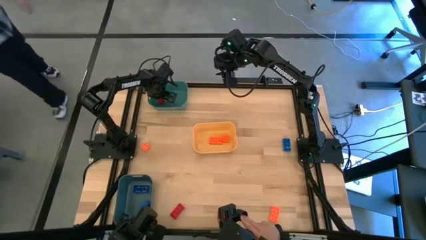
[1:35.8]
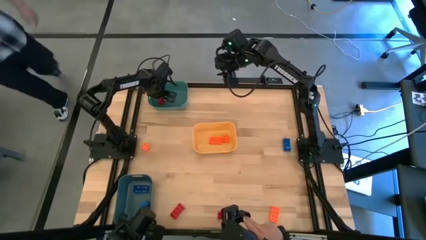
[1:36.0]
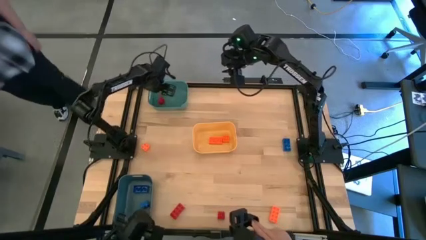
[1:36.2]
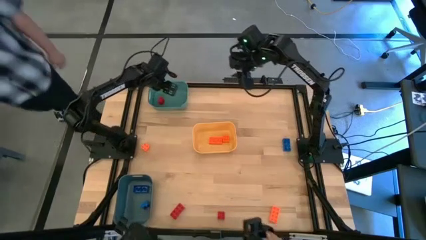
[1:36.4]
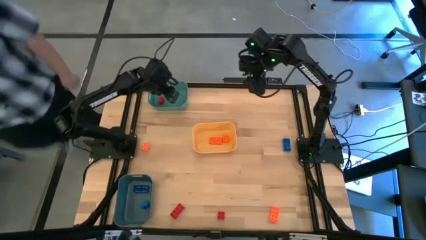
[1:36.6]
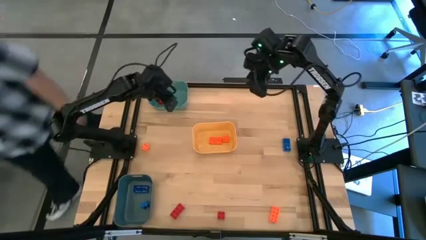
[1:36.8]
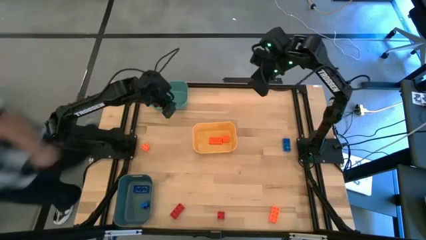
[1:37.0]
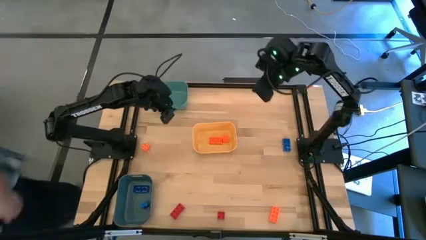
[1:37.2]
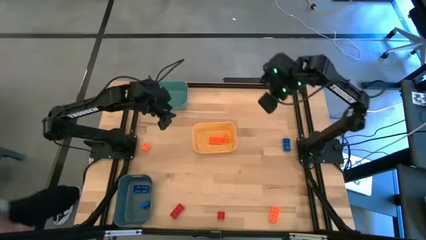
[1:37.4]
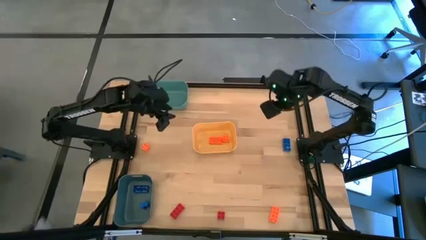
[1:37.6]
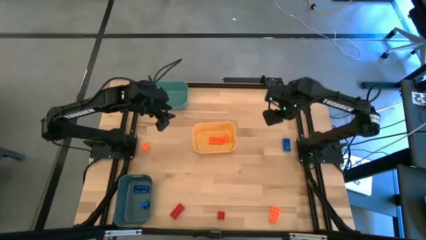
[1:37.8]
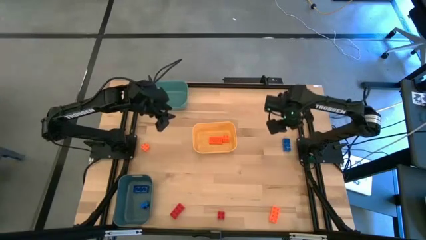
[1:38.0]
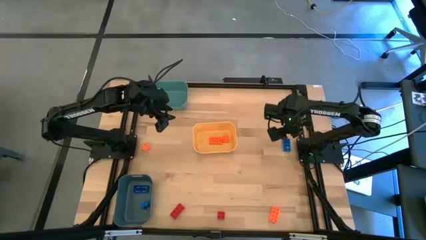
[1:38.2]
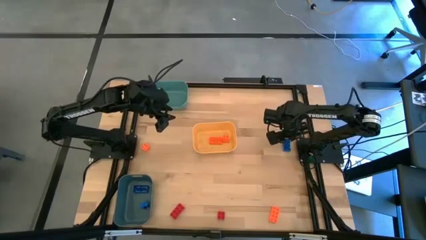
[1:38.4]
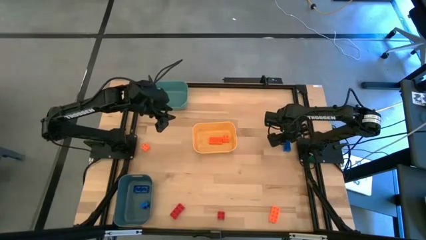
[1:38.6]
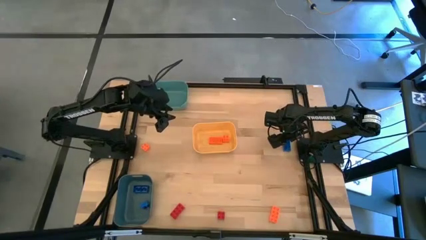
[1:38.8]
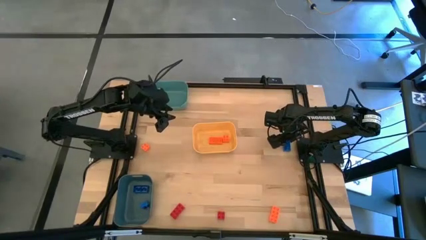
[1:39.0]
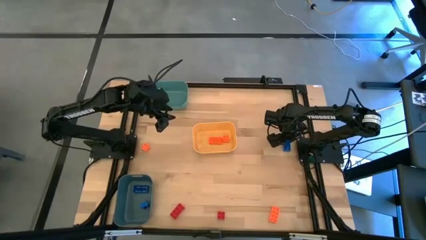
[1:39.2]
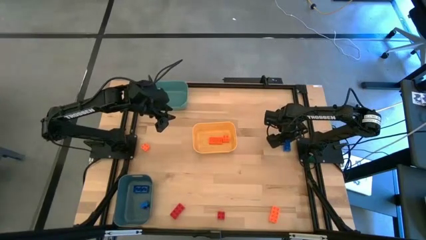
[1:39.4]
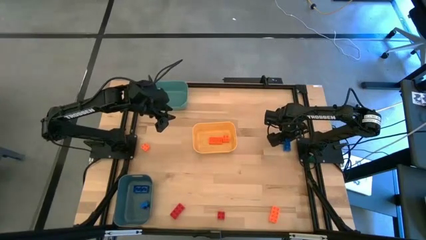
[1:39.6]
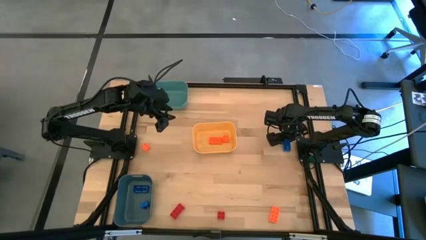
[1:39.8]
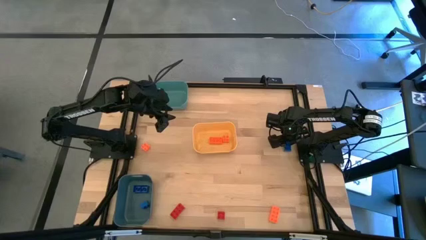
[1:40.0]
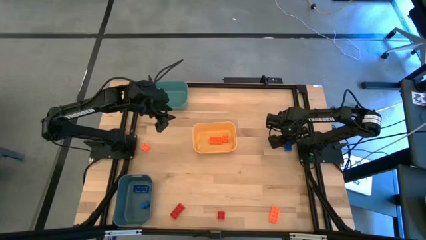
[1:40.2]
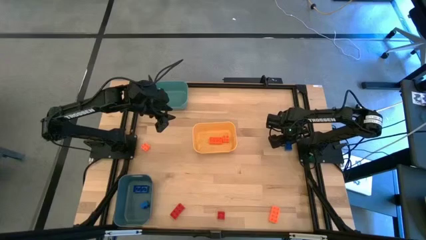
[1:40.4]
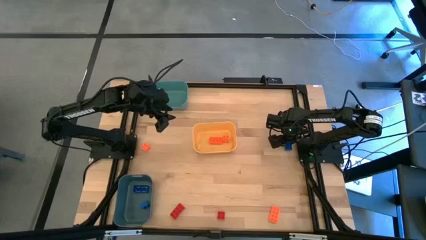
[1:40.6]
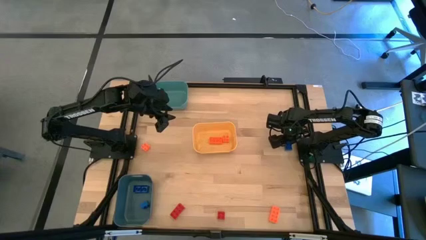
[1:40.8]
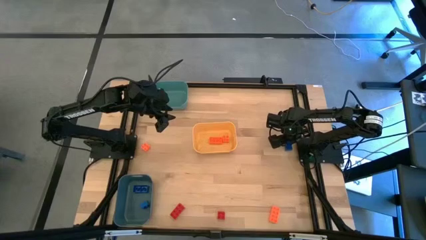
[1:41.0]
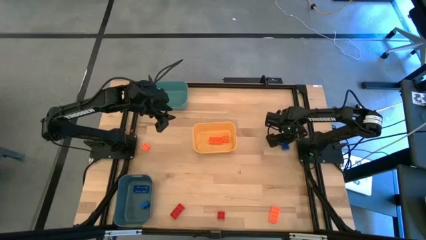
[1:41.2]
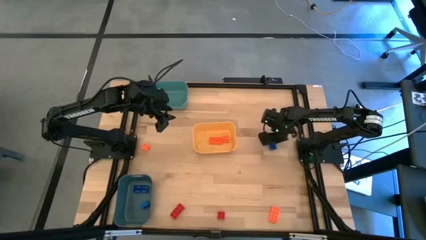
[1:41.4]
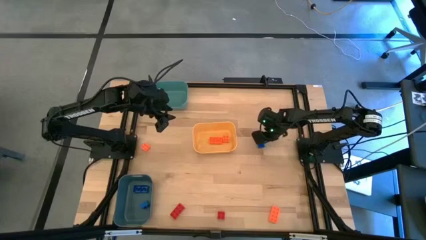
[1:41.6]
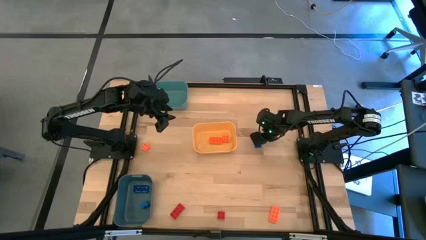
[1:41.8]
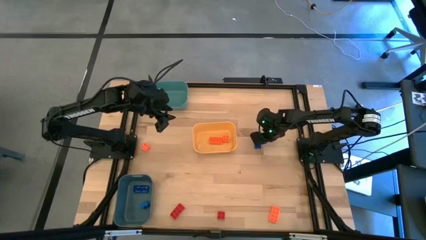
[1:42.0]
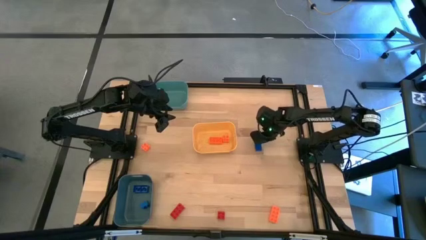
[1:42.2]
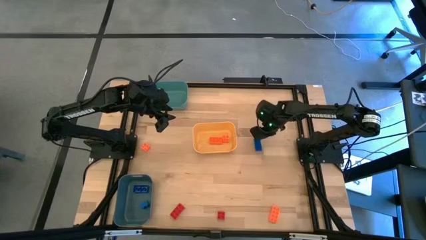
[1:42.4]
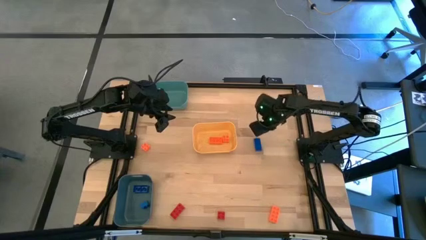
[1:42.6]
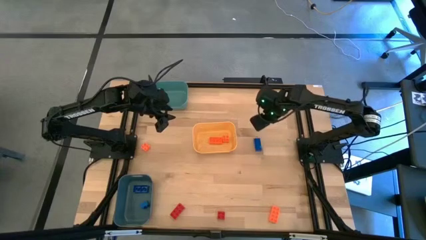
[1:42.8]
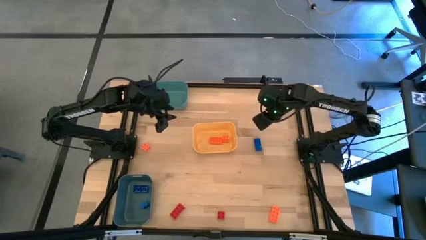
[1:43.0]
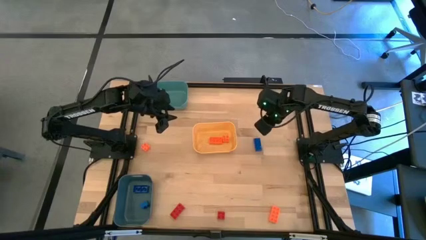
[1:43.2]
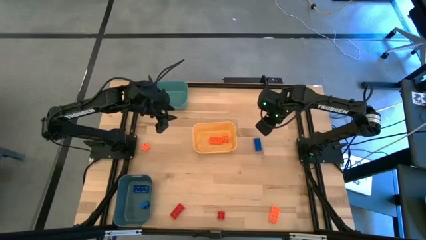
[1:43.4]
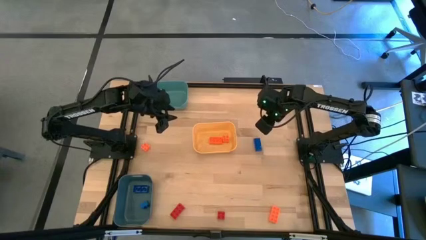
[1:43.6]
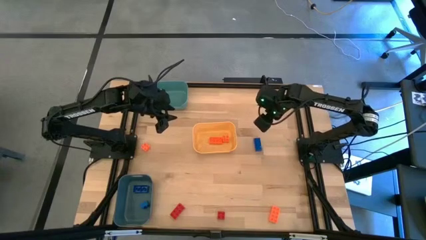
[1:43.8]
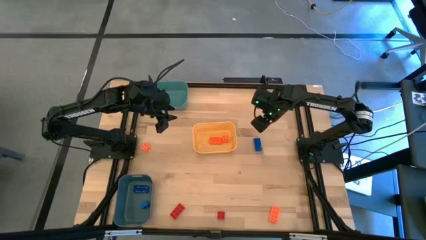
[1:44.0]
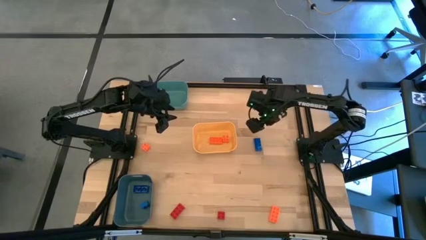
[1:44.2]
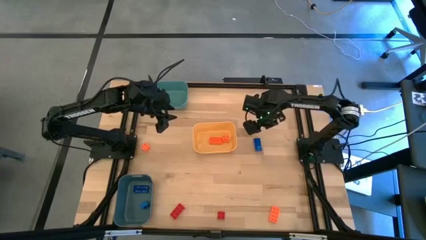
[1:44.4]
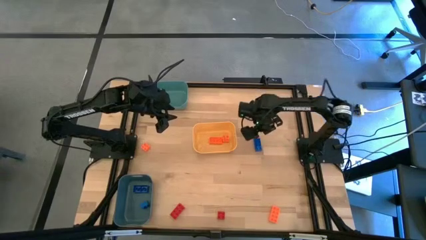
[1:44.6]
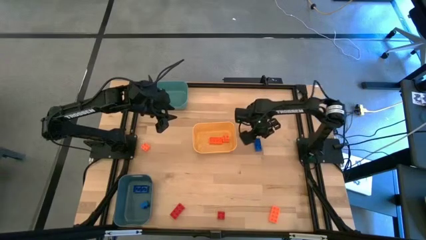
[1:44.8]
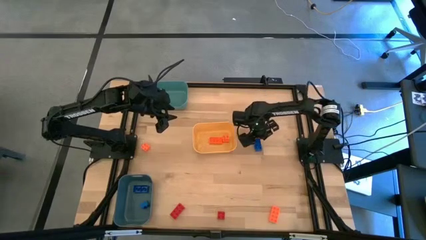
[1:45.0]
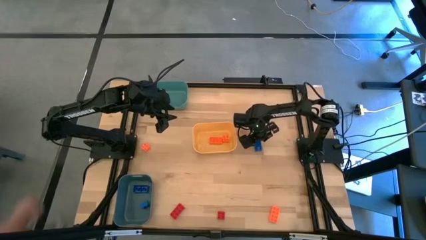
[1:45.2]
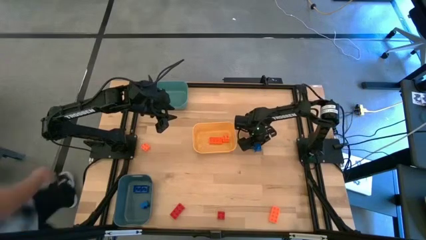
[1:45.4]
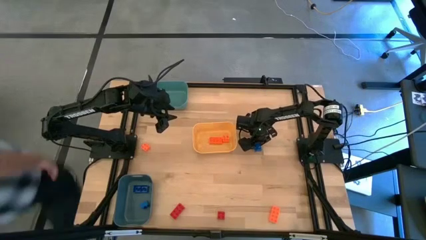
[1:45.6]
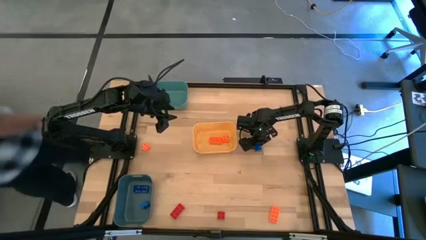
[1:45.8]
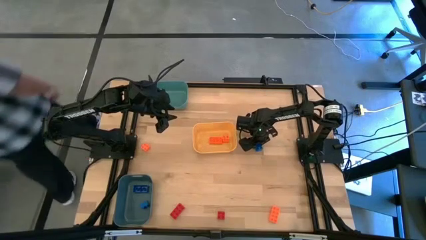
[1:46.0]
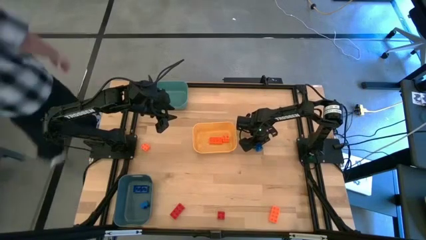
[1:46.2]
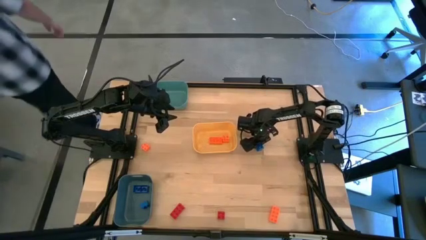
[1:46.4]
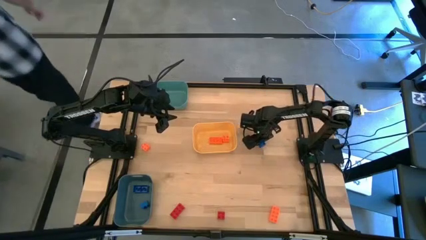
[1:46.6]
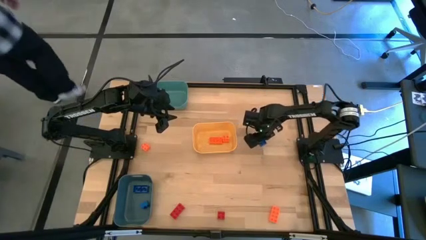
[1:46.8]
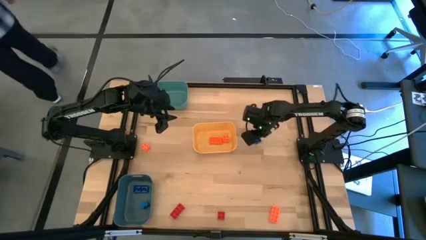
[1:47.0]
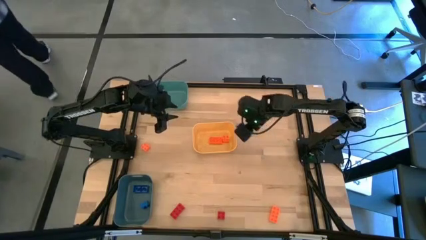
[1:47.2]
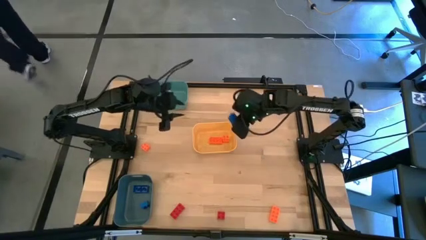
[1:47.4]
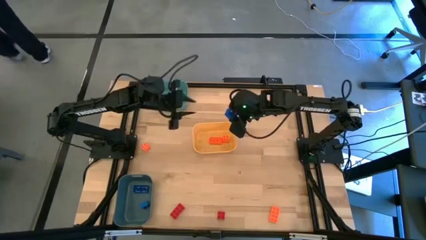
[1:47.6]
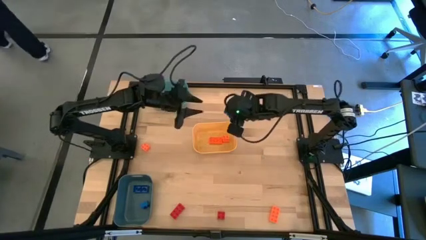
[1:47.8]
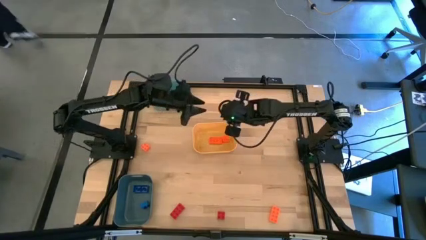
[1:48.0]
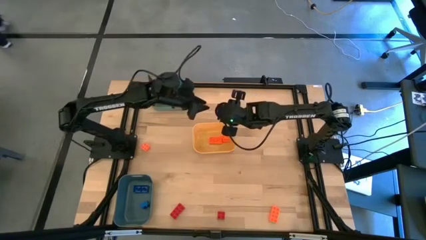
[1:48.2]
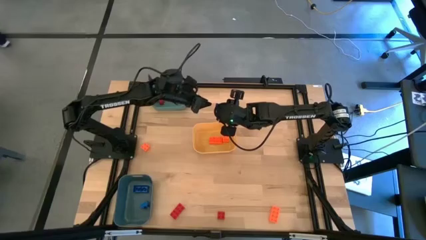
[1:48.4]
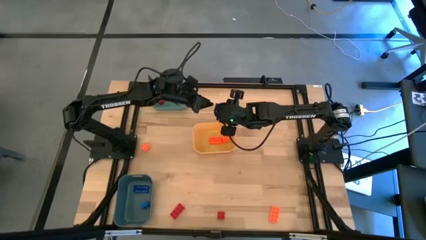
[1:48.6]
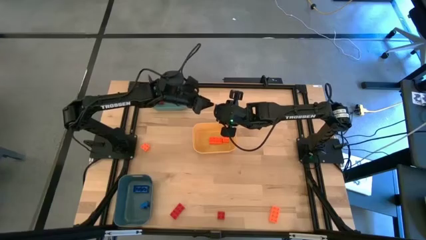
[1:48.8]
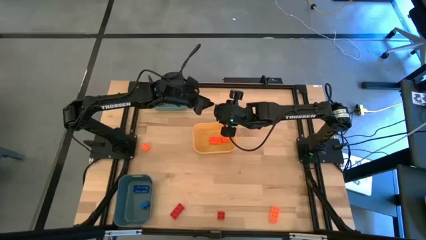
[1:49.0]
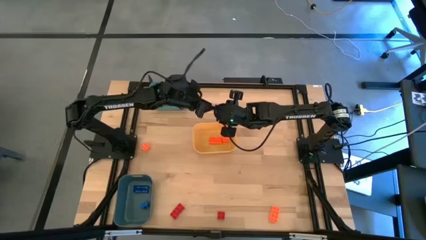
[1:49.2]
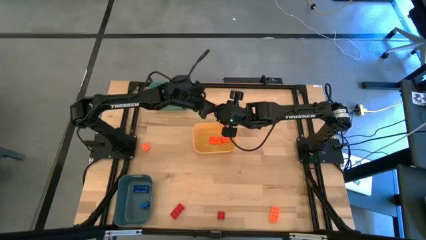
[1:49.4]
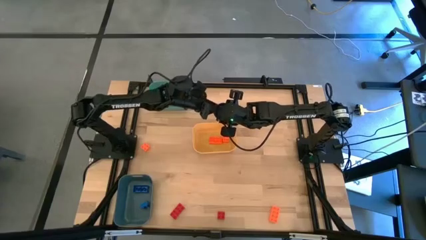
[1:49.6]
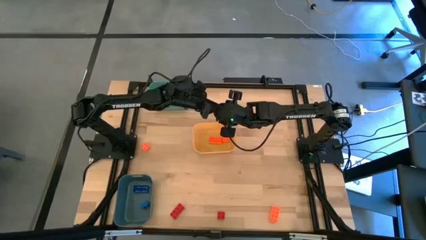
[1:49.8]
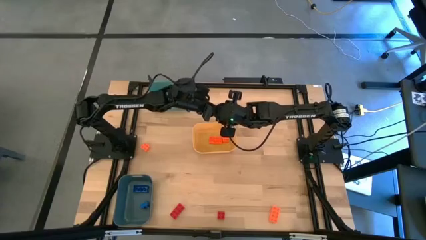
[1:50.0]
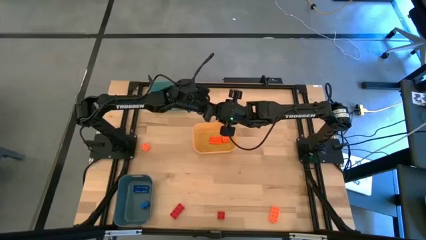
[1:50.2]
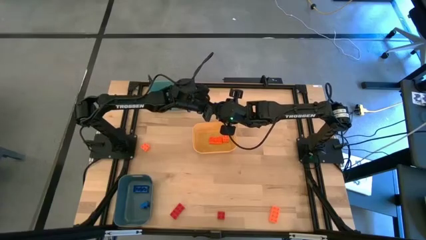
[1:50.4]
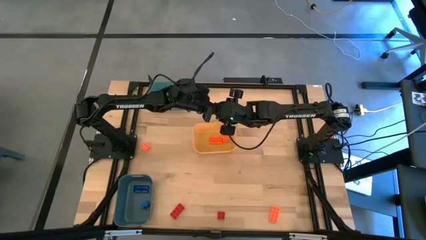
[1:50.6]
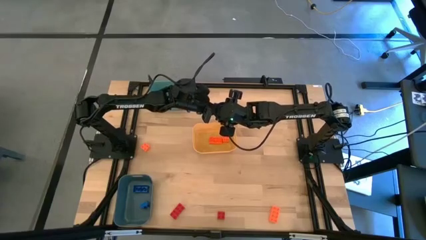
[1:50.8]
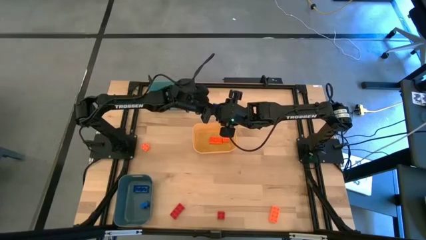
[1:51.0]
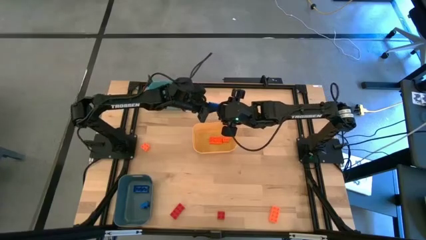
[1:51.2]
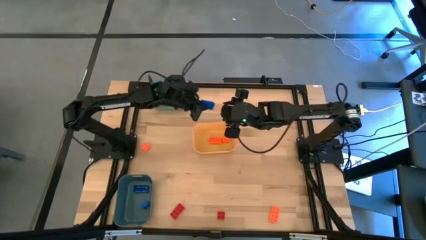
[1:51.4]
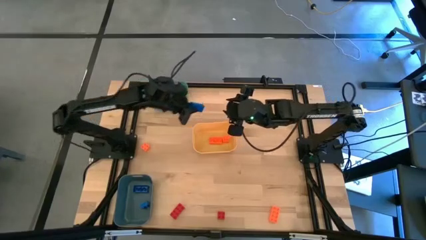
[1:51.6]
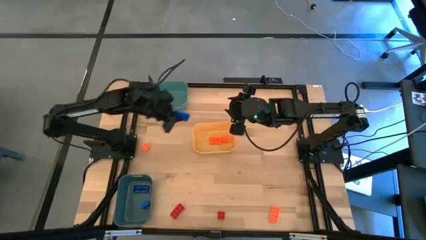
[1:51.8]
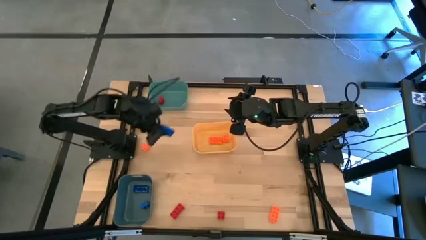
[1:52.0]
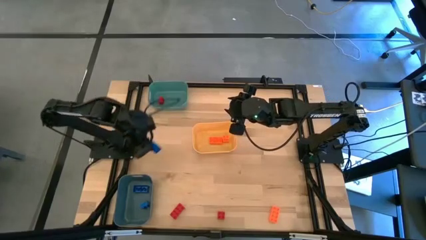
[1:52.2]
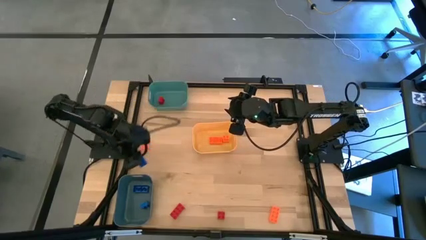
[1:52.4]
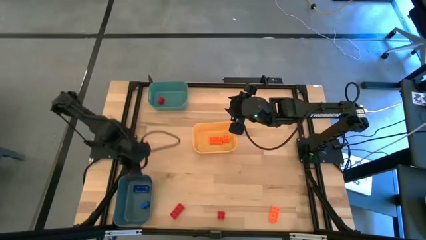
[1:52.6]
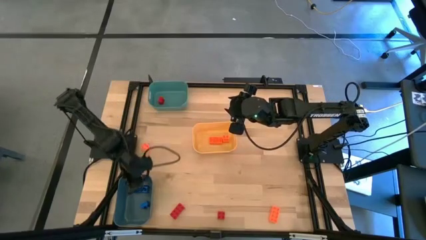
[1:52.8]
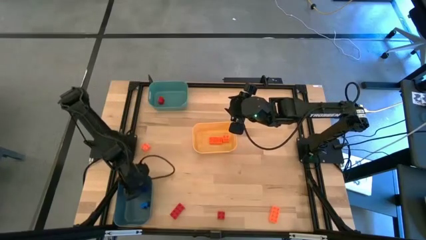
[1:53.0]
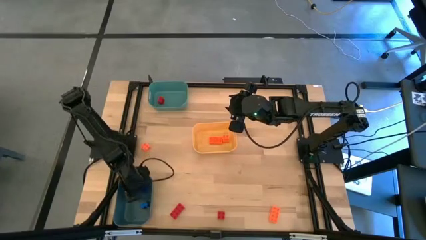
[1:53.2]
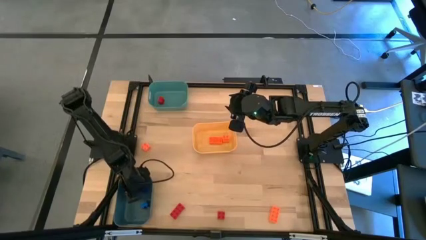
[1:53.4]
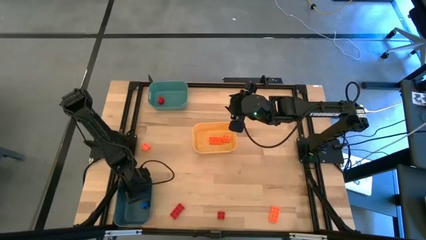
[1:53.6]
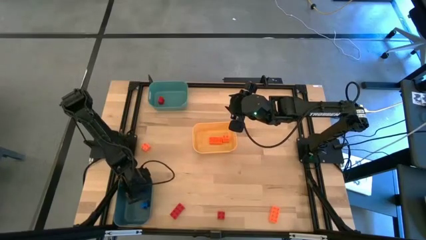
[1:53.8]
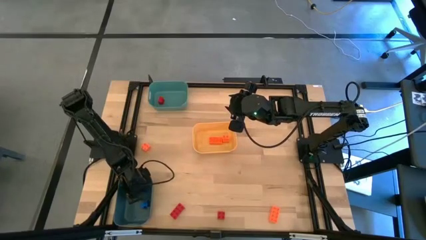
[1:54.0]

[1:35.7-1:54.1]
Task: Sort & place blocks by color
Put the blue 8 stud game piece into the blue bin
